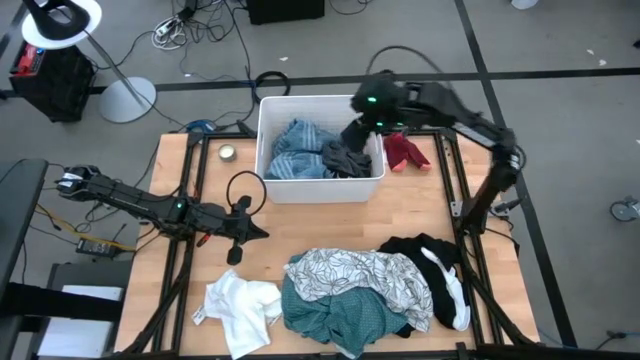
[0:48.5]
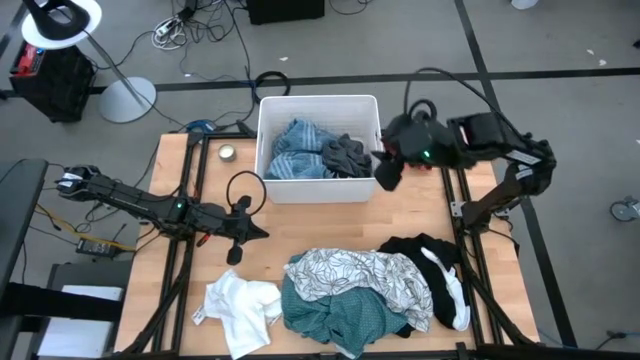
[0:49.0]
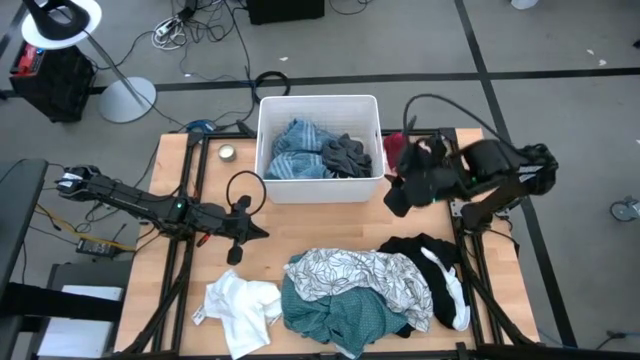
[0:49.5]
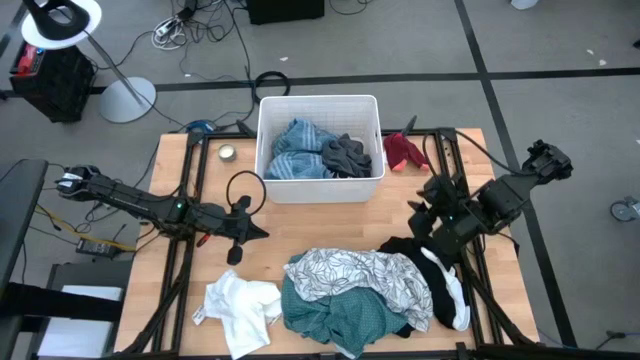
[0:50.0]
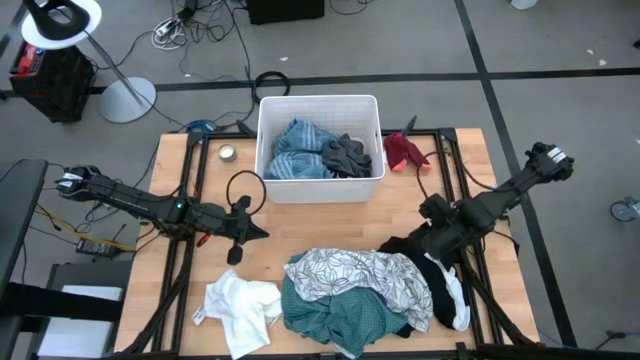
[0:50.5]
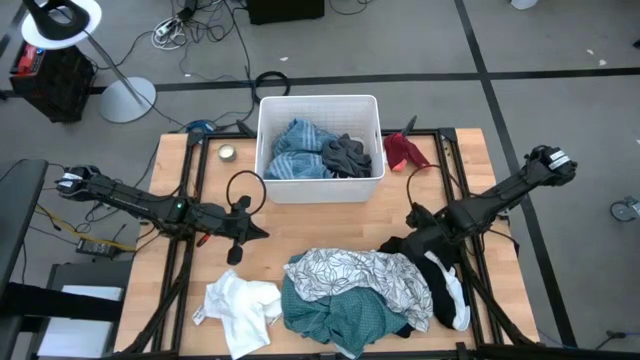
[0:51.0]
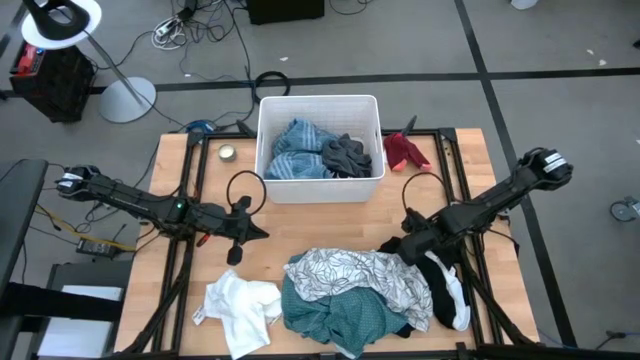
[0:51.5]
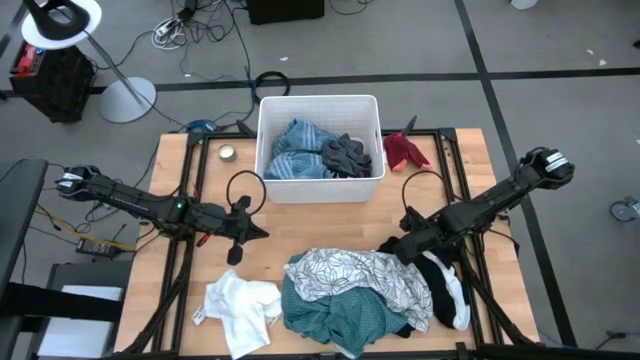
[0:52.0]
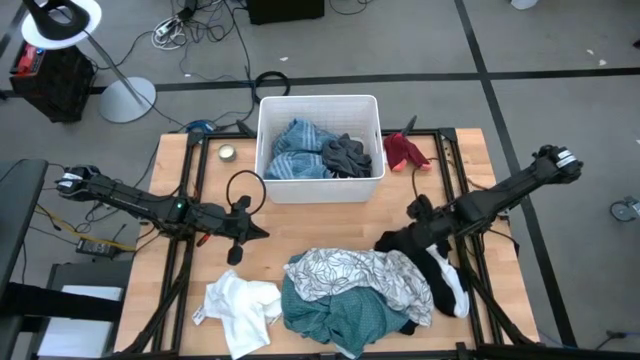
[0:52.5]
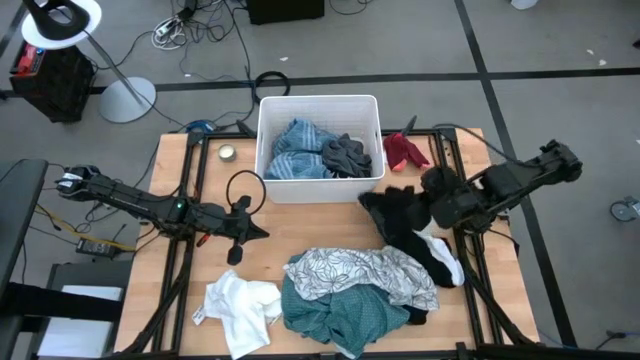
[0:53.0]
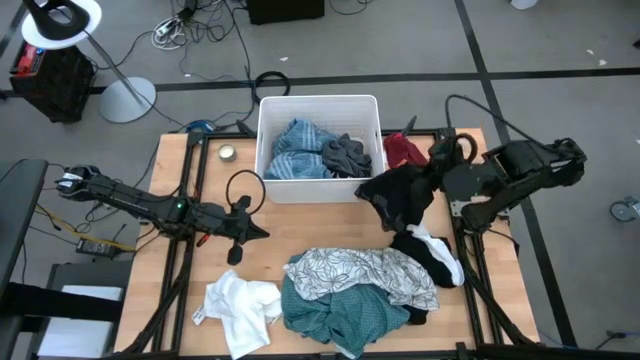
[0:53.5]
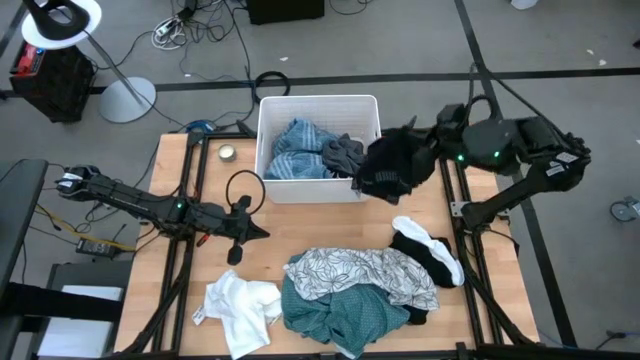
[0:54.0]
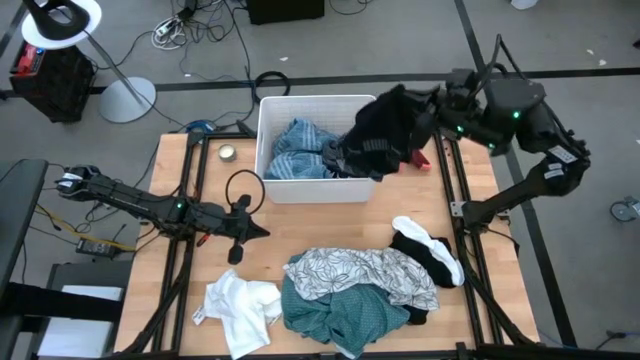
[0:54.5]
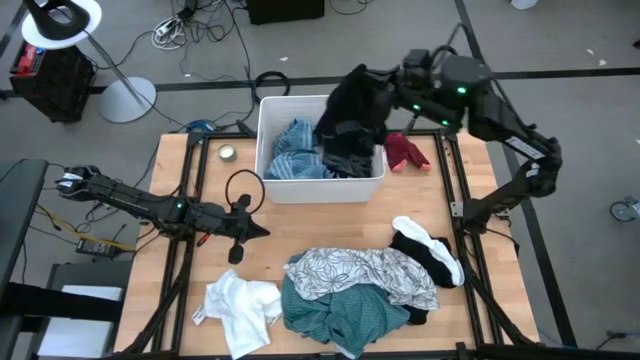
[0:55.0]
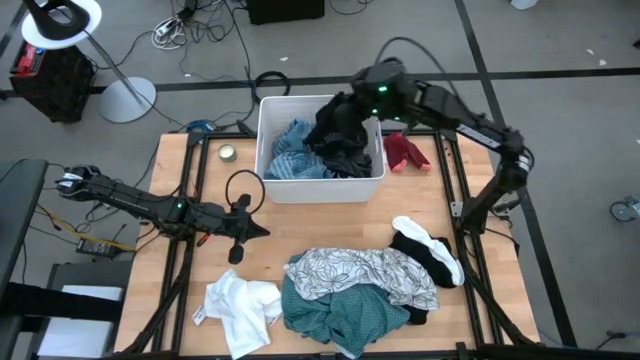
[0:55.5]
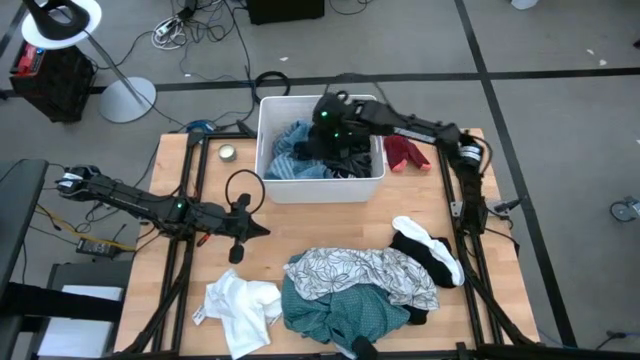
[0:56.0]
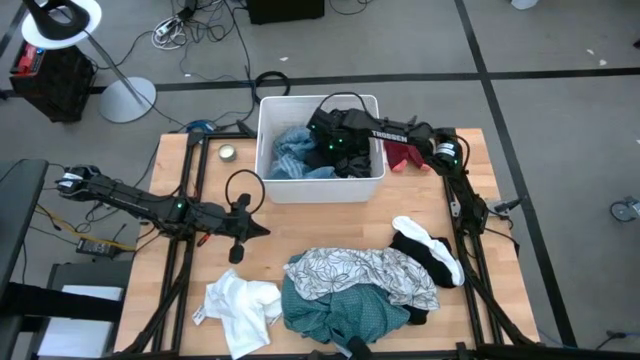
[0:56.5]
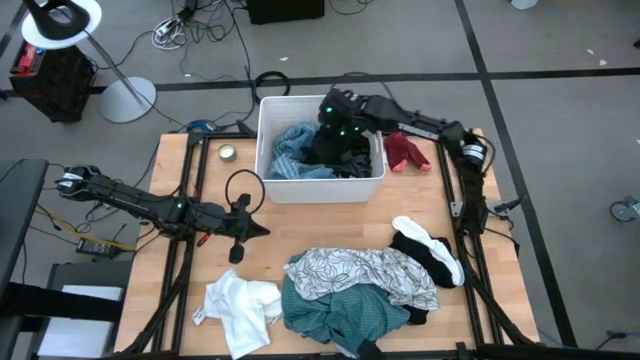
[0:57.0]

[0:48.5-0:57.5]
Task: Sort clothes
Put the black boxer into the white laundry organizer

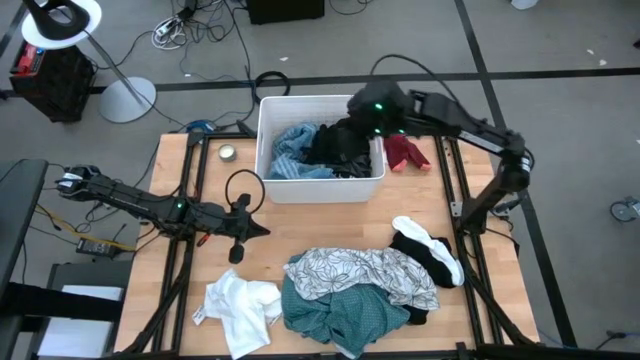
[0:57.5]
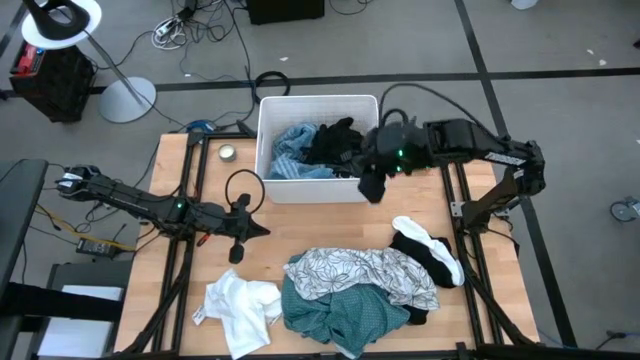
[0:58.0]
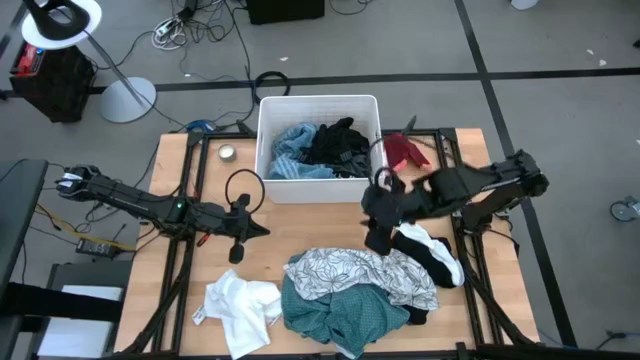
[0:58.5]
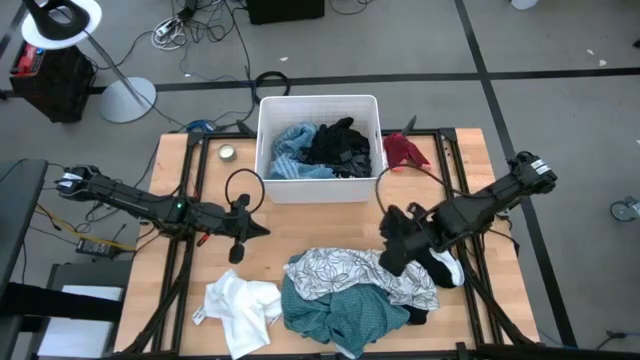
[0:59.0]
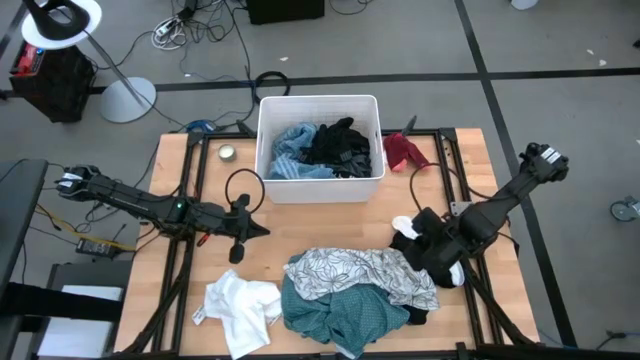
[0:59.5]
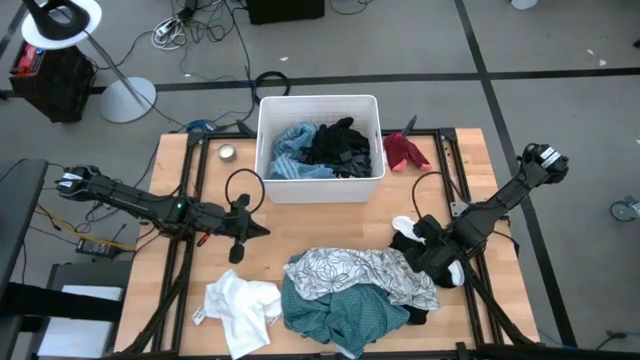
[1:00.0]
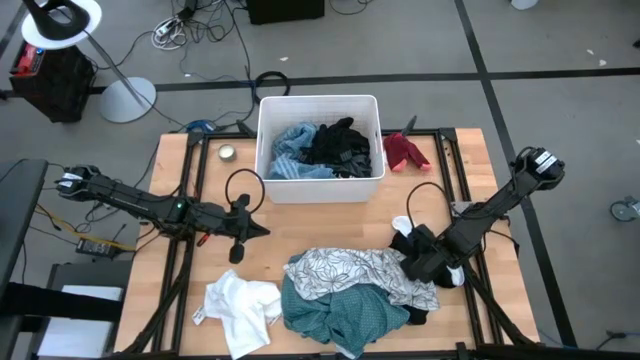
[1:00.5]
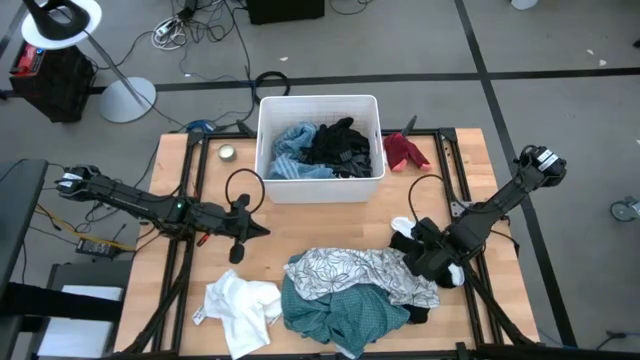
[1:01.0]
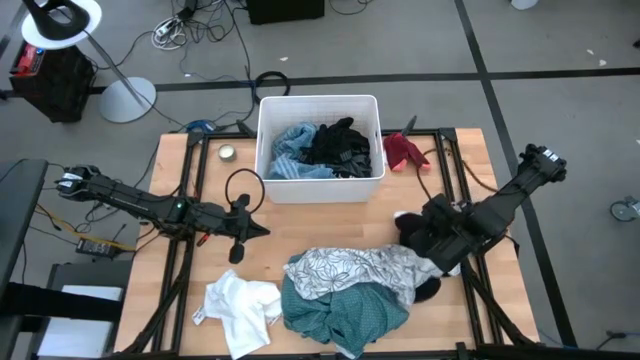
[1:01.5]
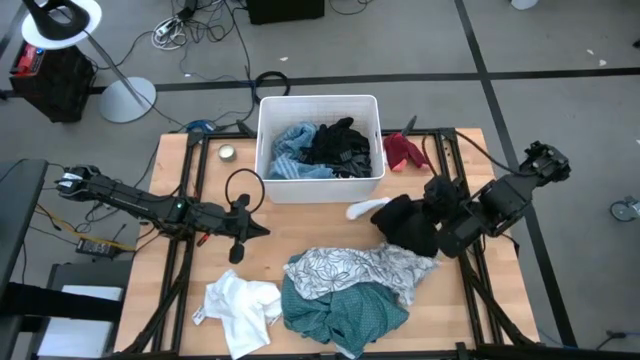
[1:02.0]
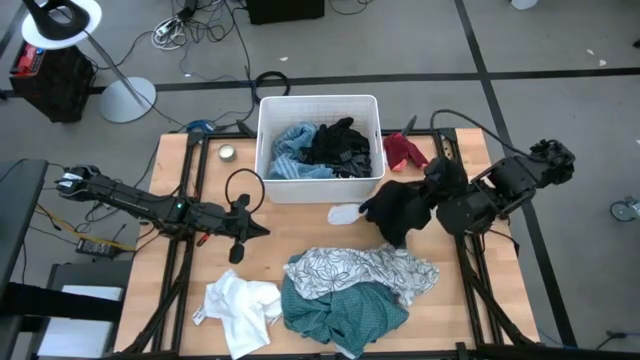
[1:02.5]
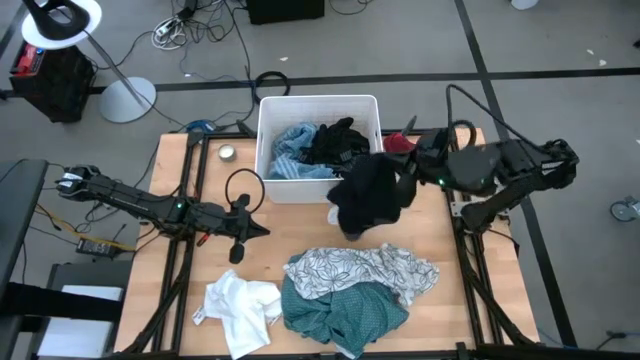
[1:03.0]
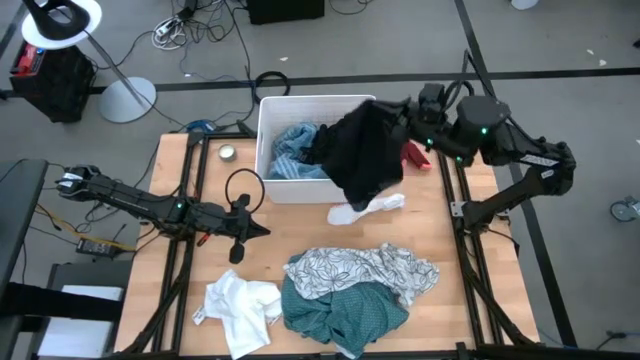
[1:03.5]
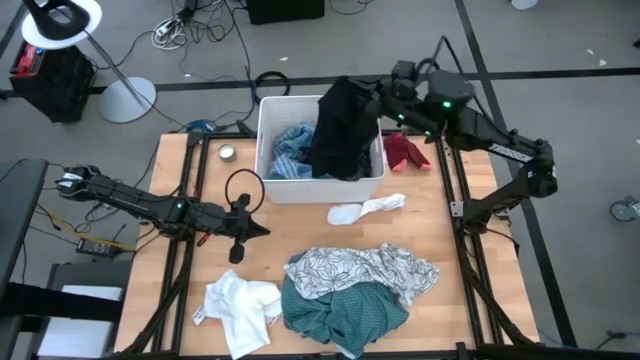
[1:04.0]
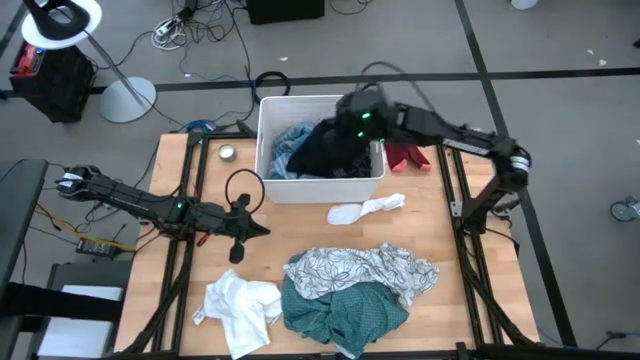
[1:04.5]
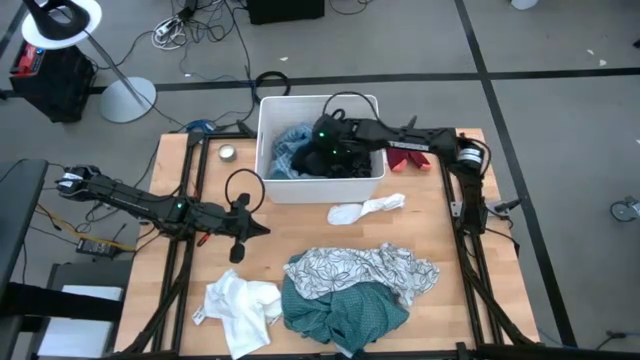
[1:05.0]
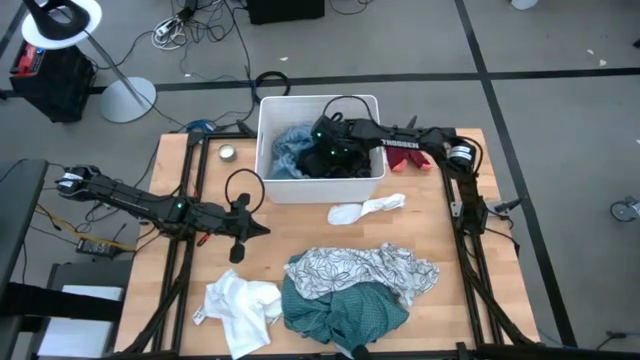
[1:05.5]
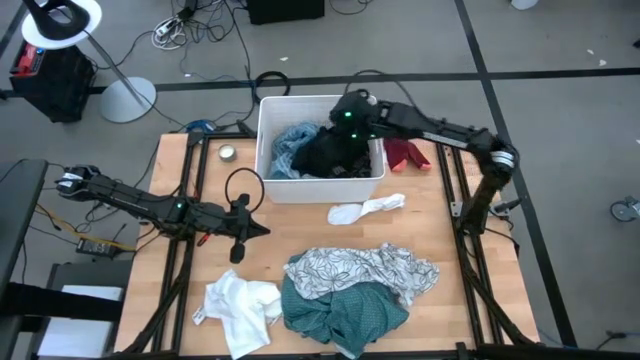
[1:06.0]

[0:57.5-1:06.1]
Put the black boxer into the white laundry organizer

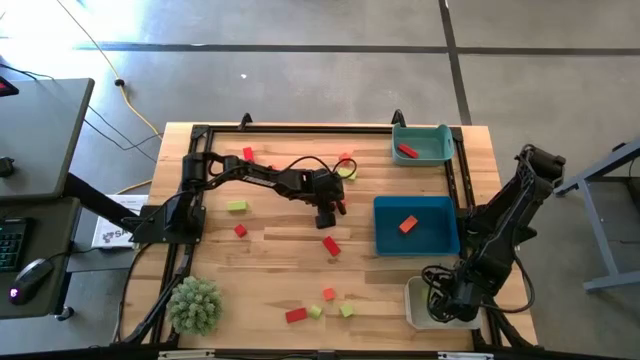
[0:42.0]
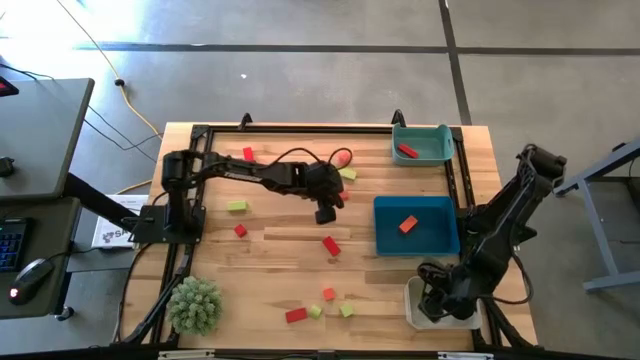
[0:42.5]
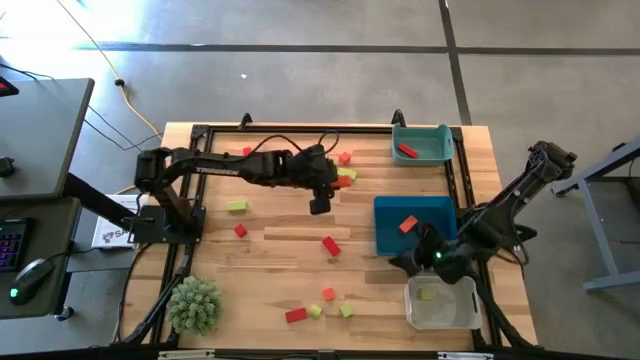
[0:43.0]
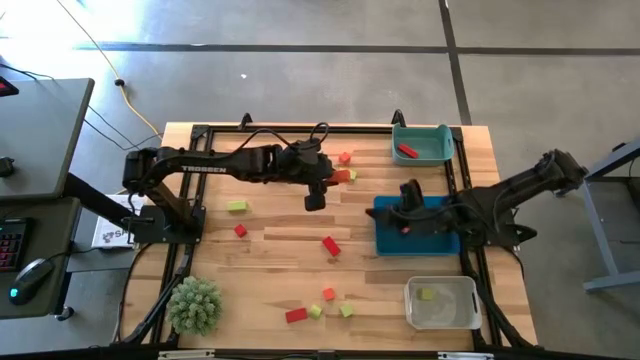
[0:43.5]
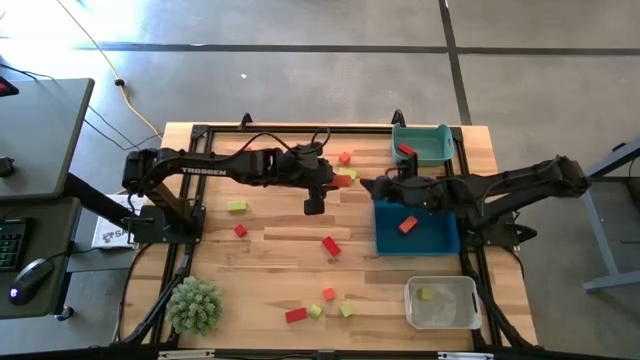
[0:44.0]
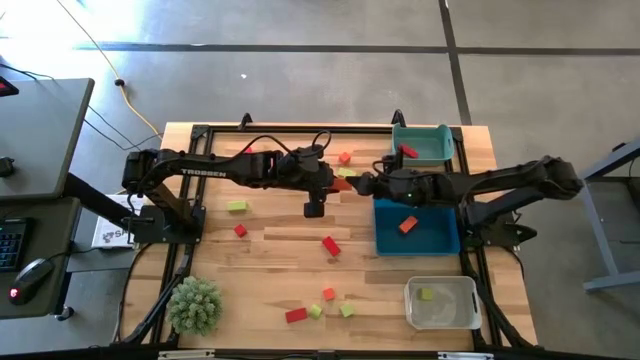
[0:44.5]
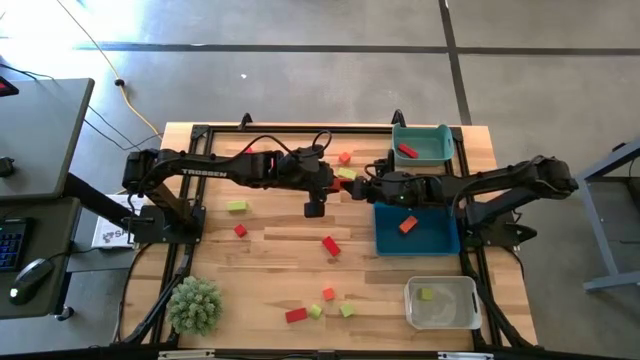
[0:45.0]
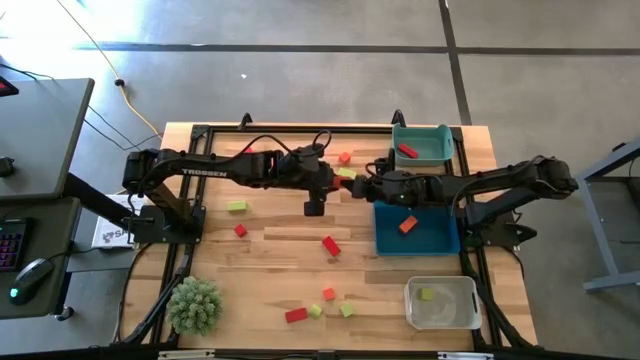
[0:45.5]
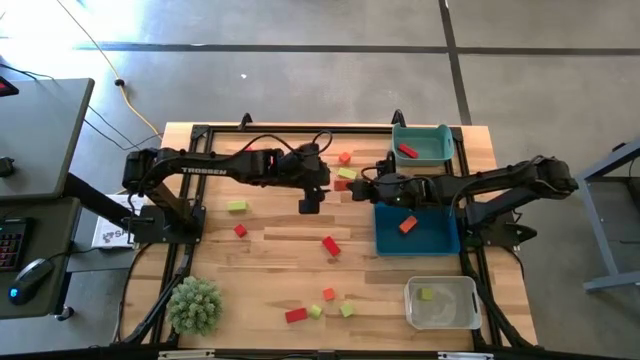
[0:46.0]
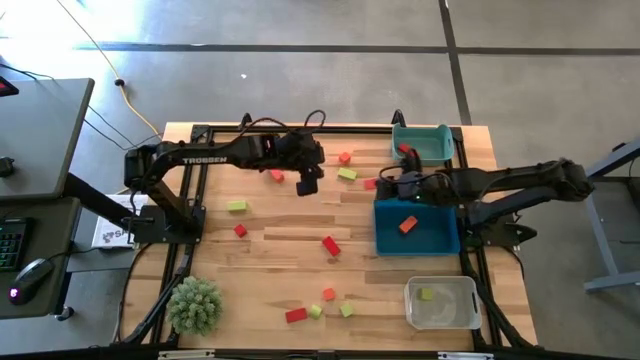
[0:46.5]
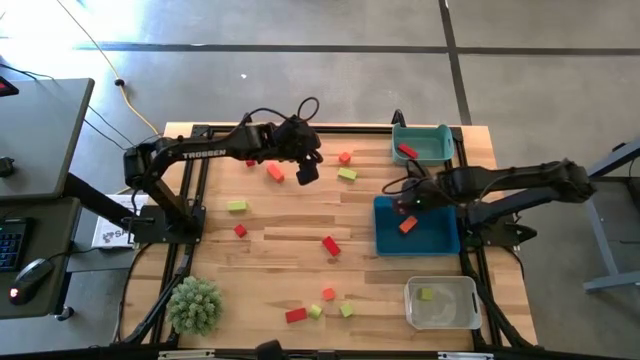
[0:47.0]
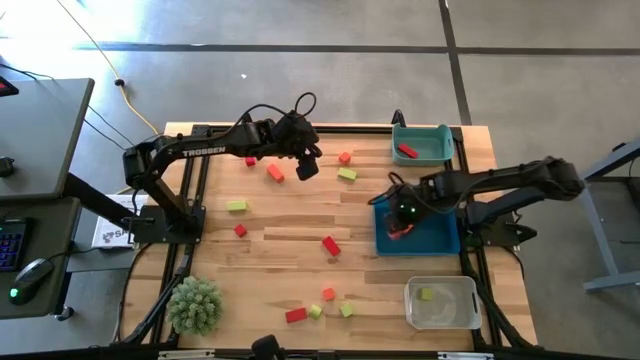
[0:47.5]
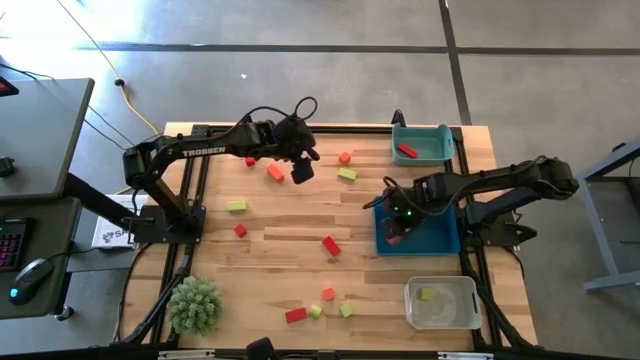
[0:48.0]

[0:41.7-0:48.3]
Task: Sort & place blocks by color
Put the orange wooden block into the blue bin
